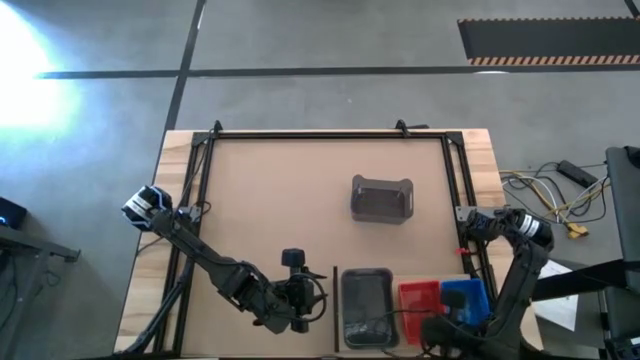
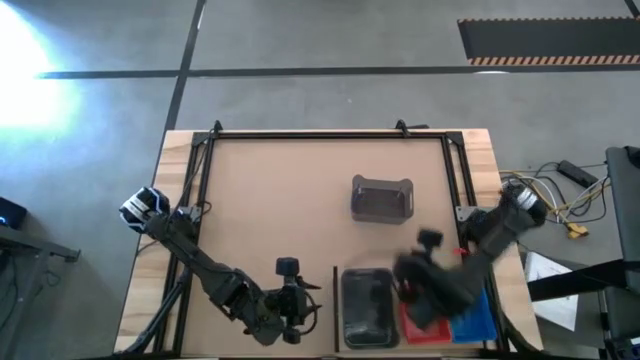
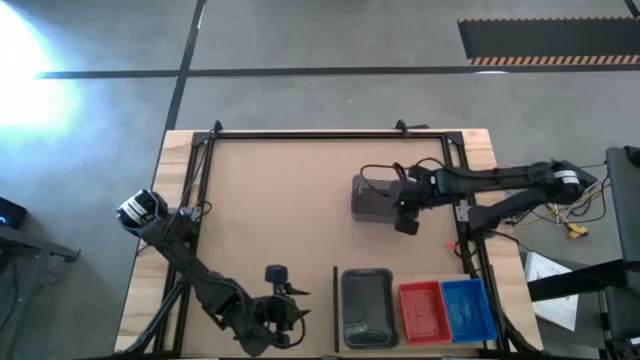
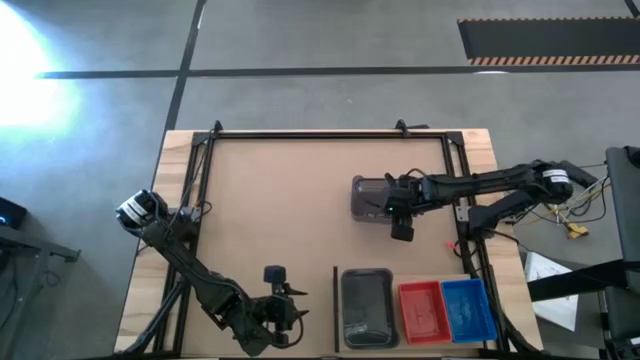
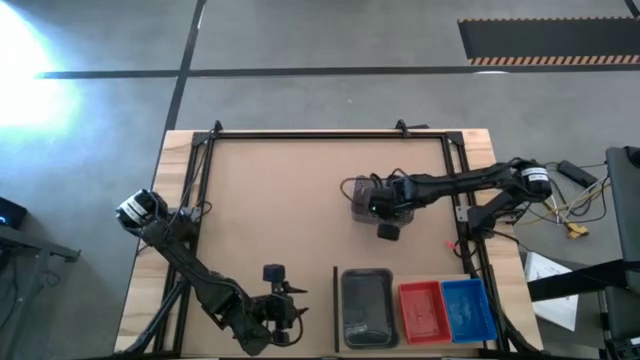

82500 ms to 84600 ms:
Task: Stack baskets on shelf by color
Stack the black bin on top of the black bin on the shelf

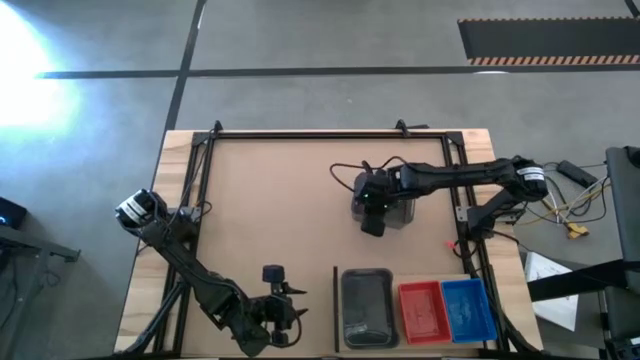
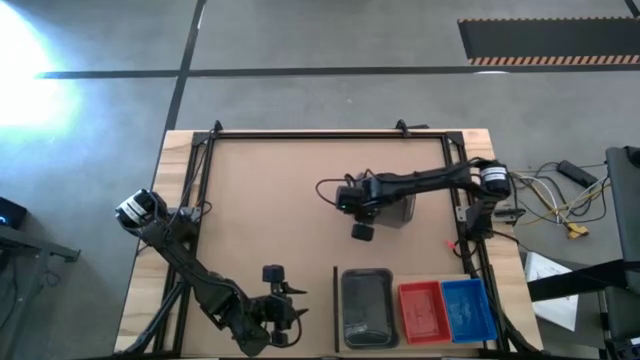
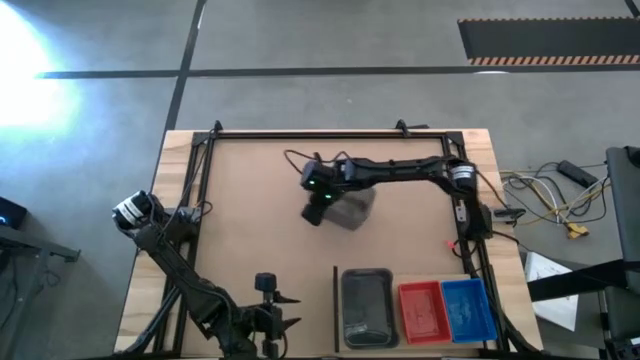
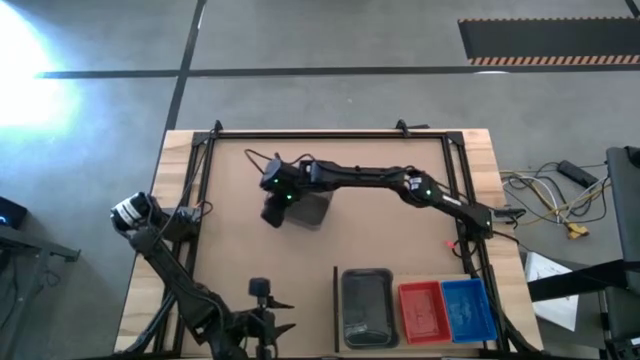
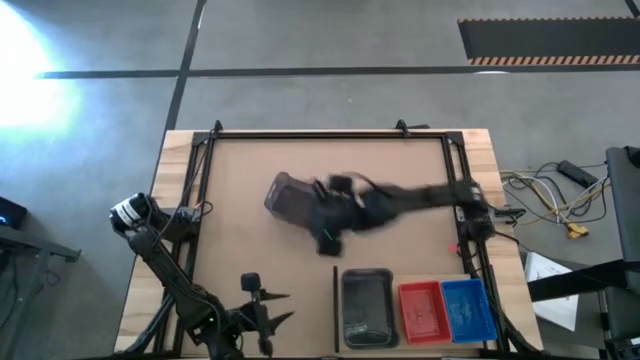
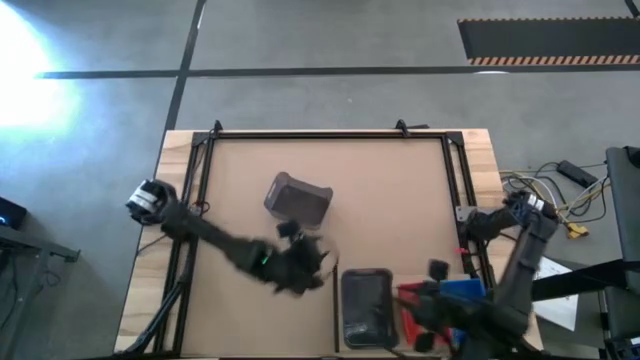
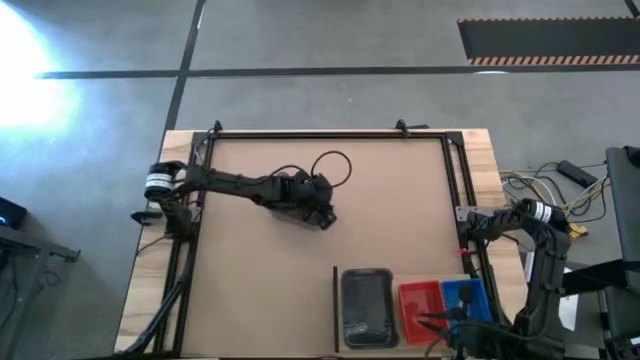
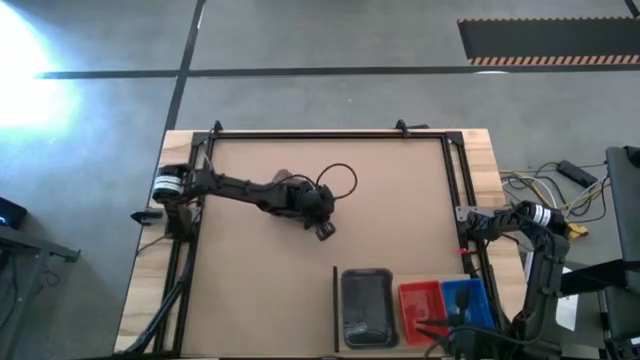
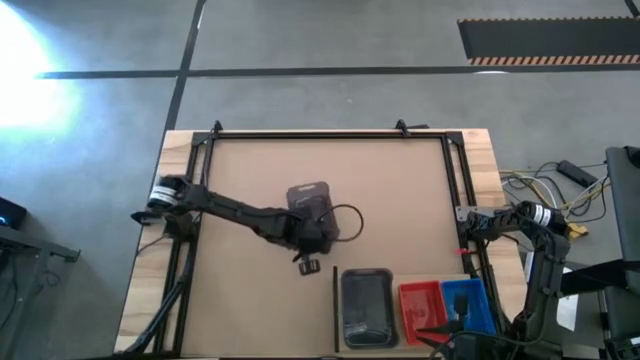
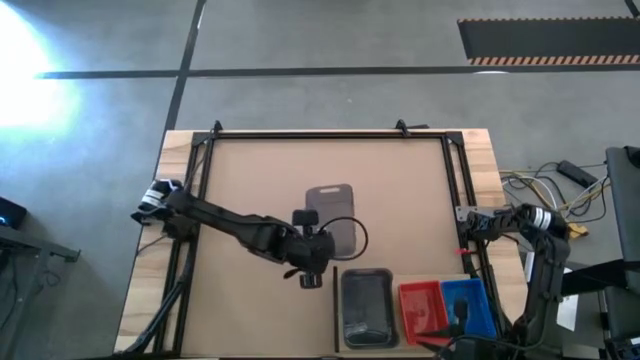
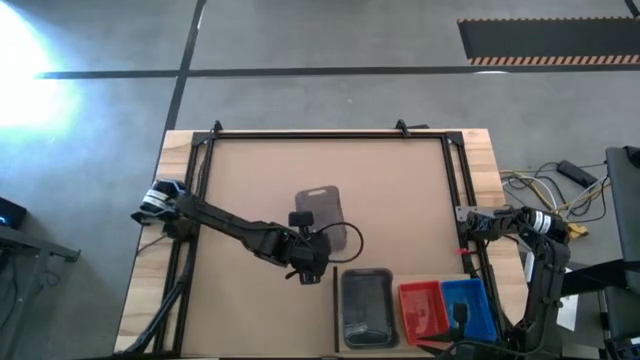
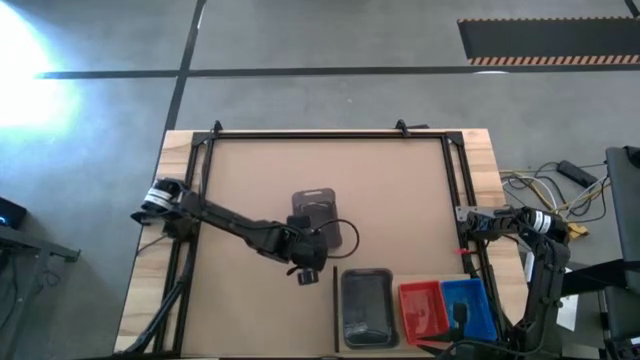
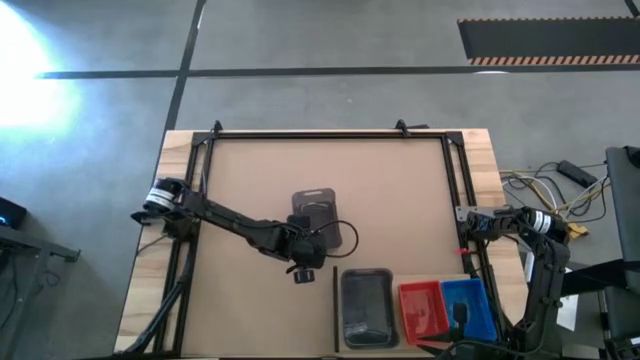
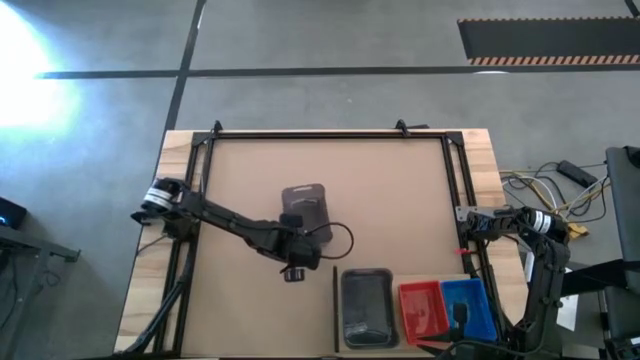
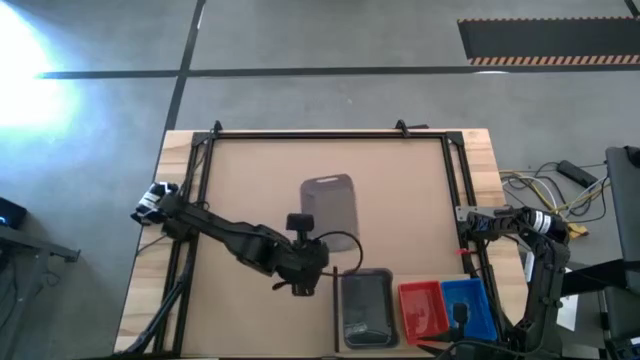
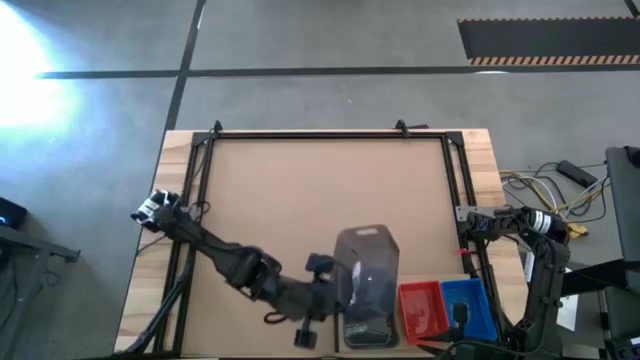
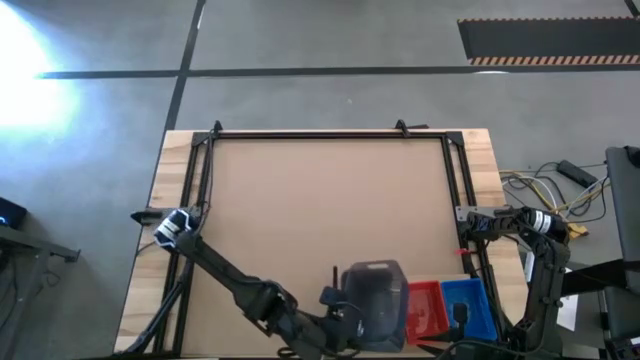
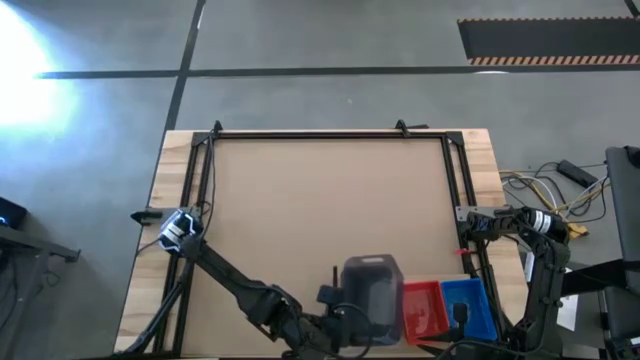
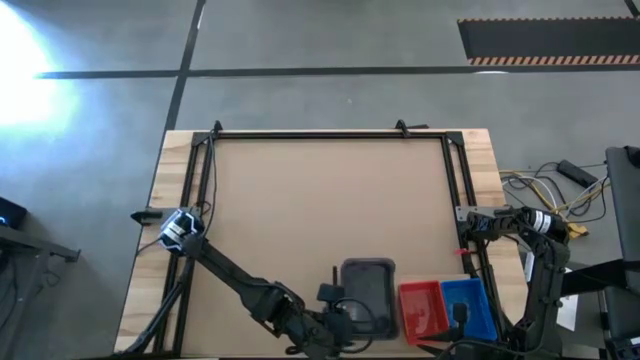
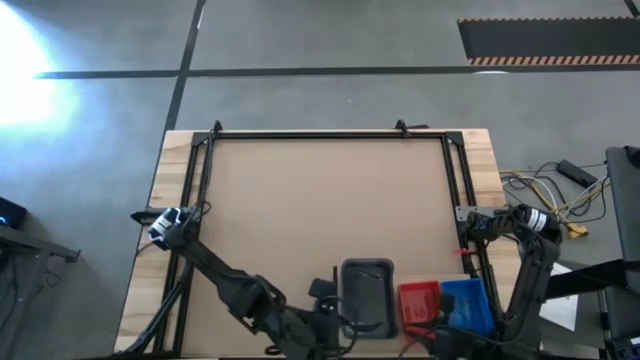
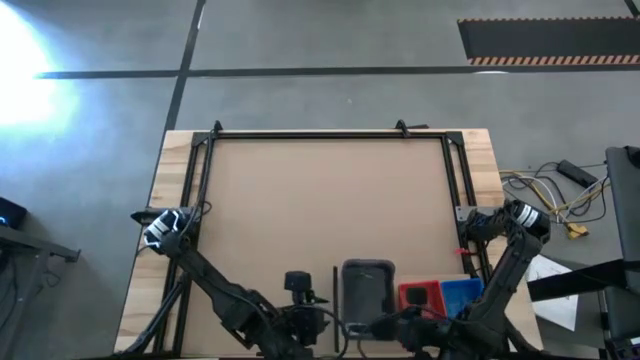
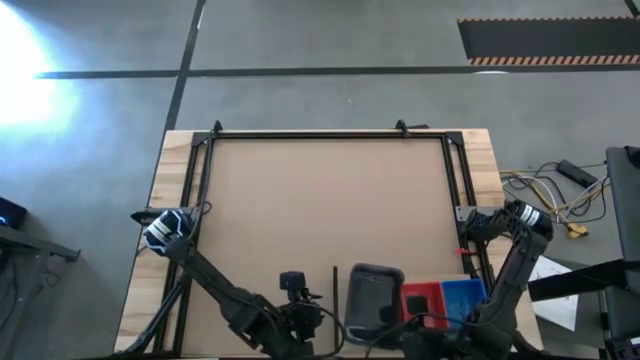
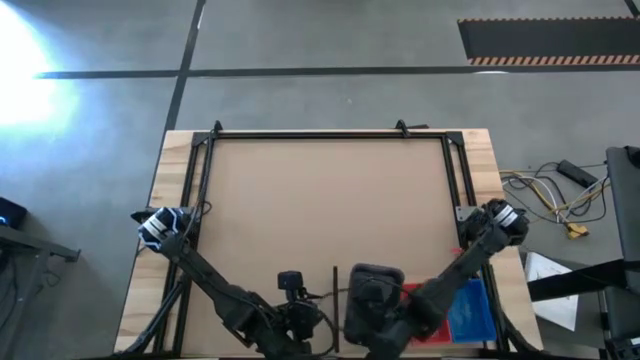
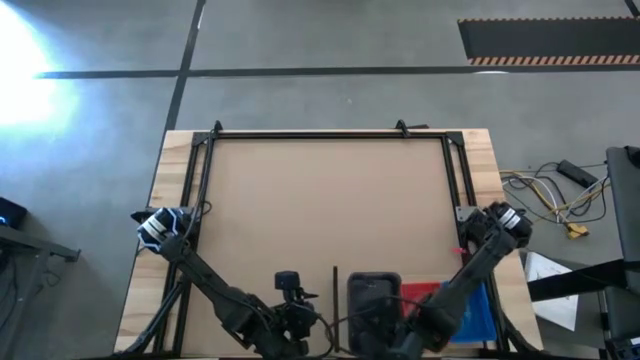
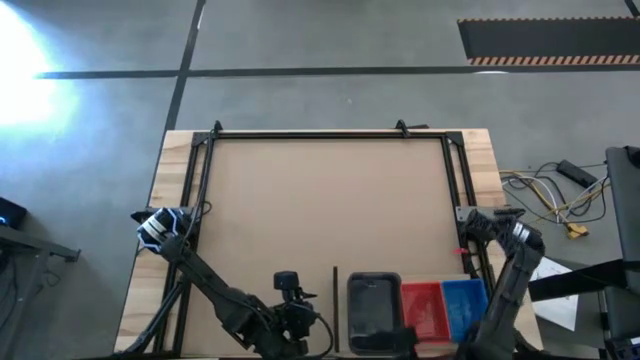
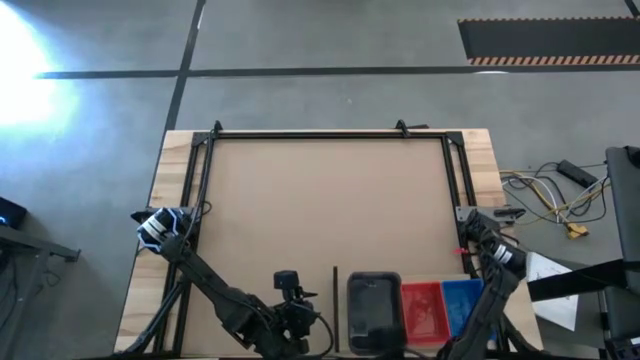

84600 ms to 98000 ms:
Stack the black bin on top of the black bin on the shelf

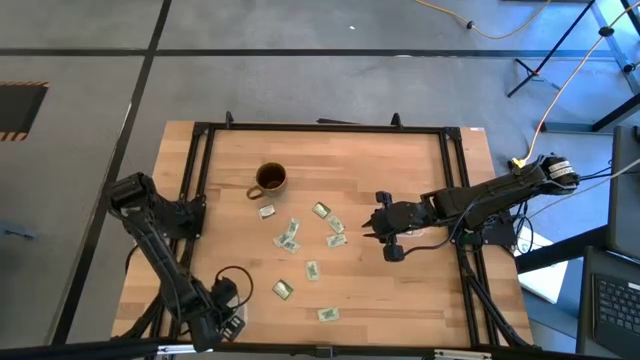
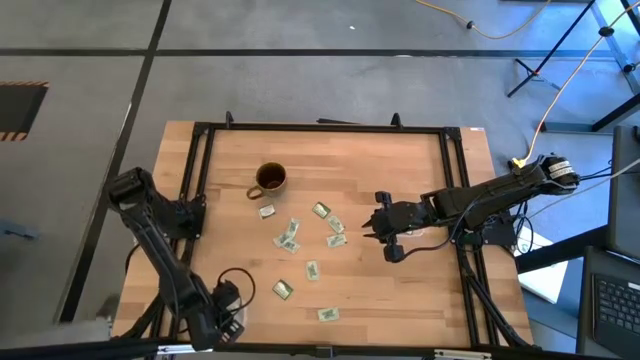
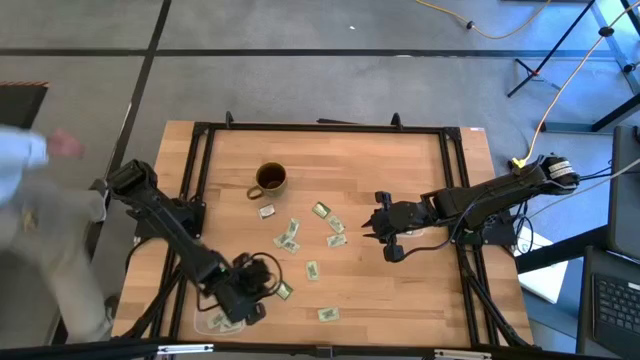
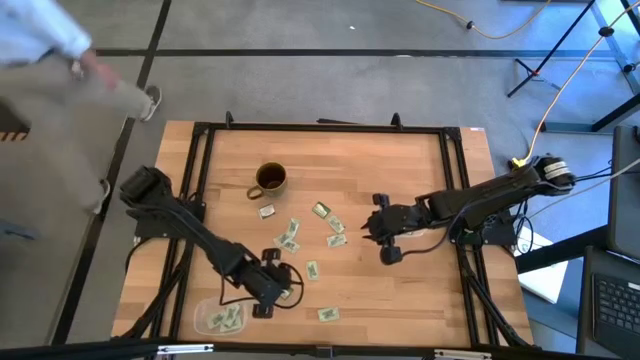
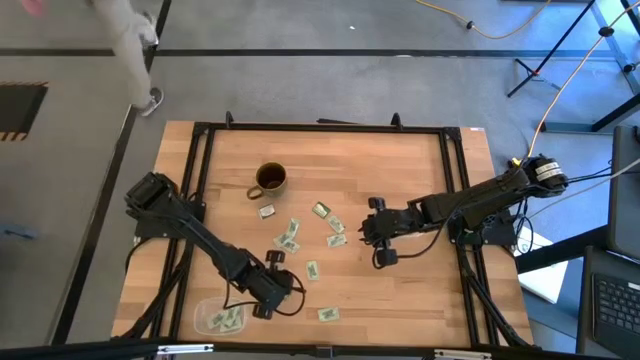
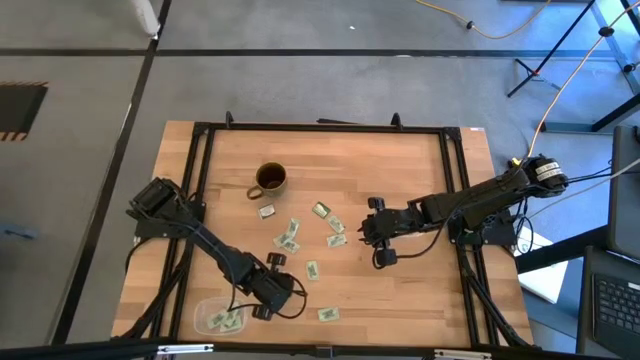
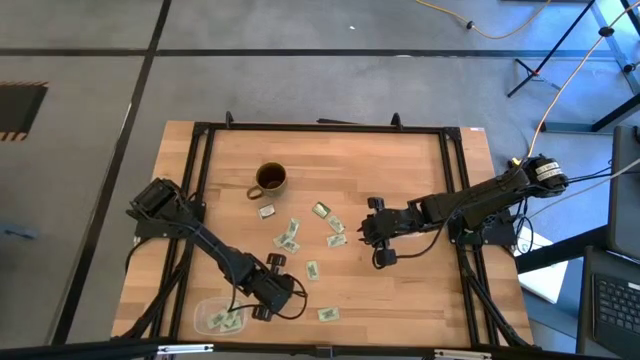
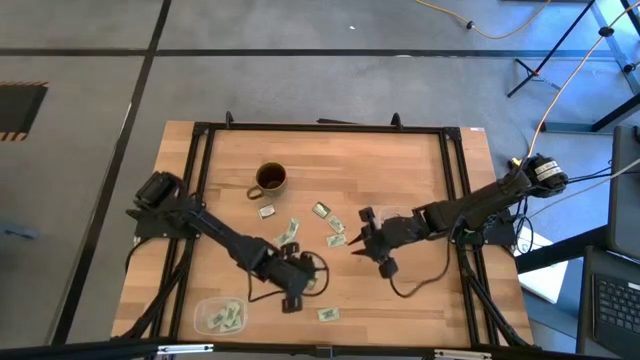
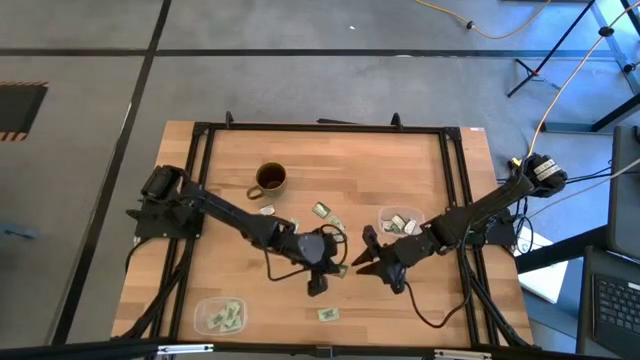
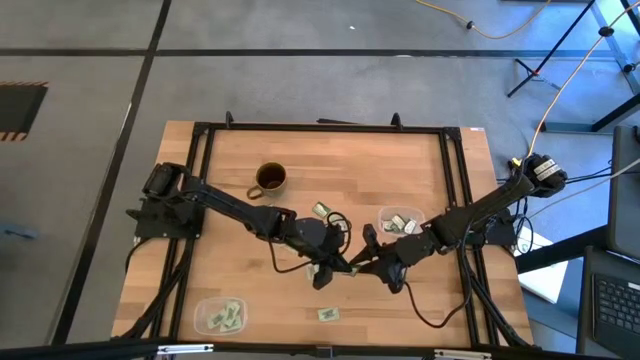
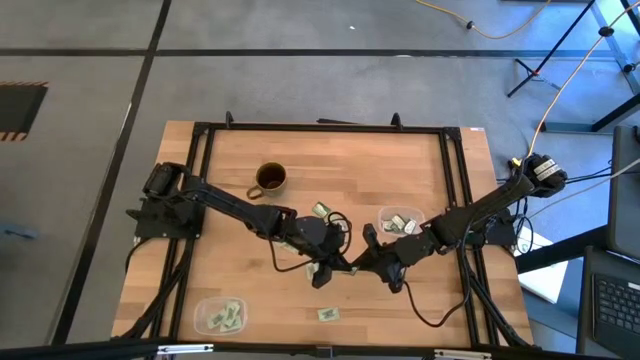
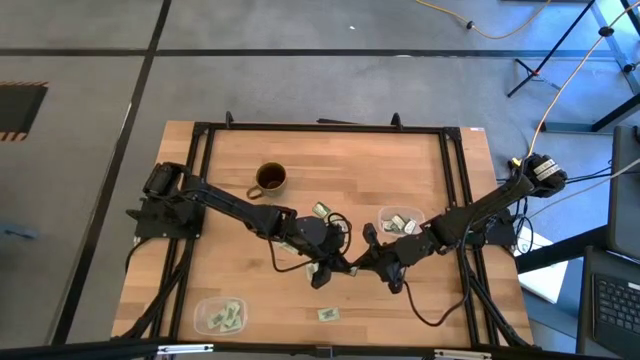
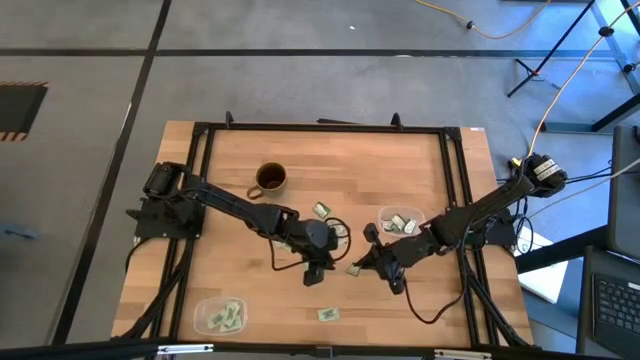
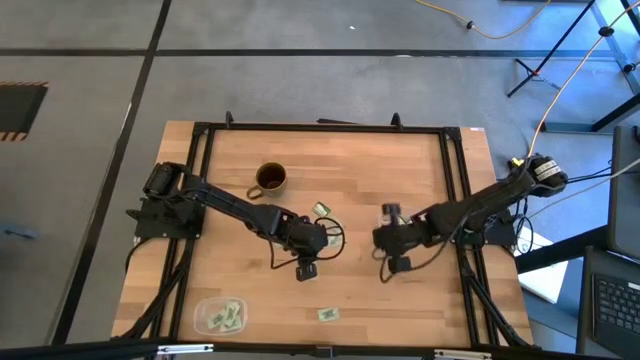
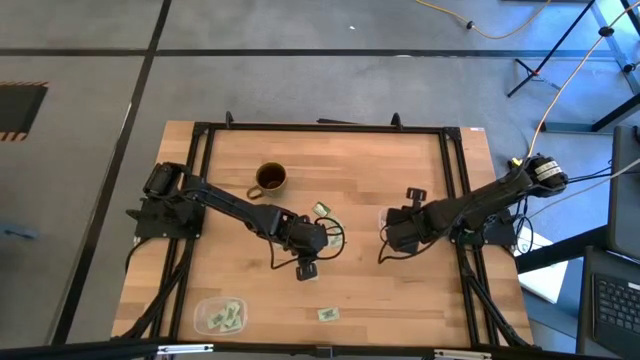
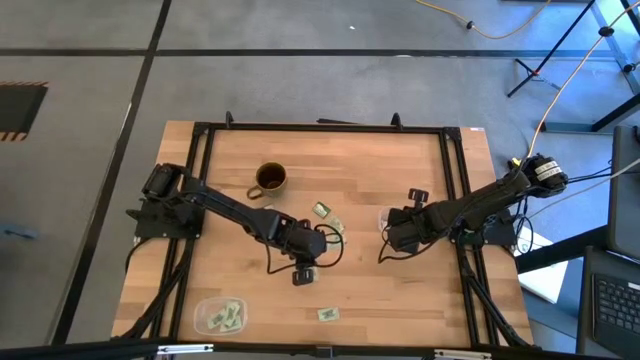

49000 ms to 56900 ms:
Task: Pick and place Stevia / Truvia into bins
Put the truvia packet into the top transparent container
